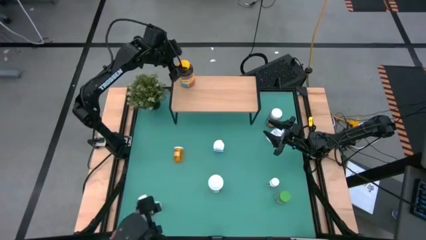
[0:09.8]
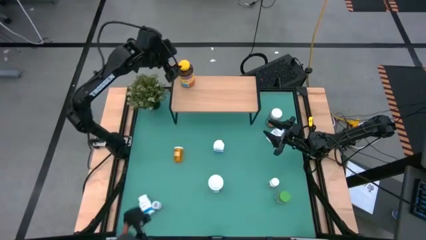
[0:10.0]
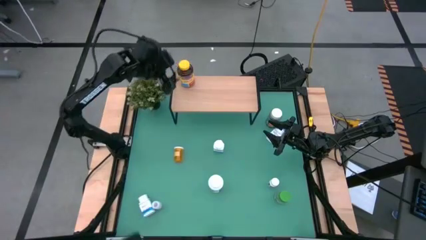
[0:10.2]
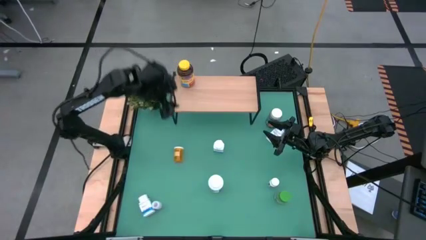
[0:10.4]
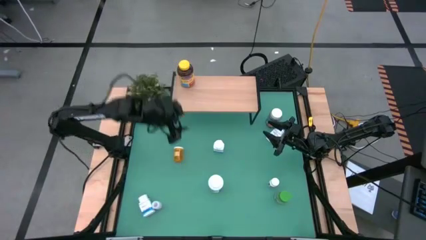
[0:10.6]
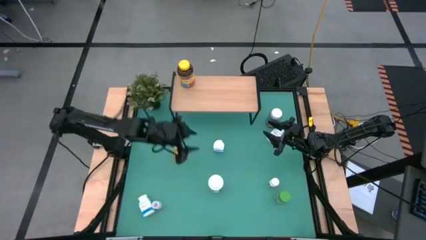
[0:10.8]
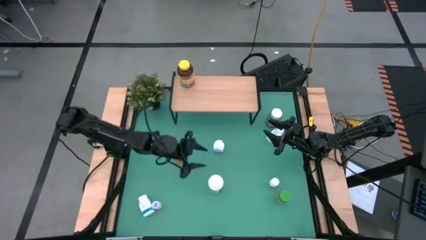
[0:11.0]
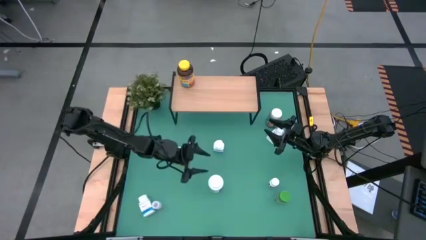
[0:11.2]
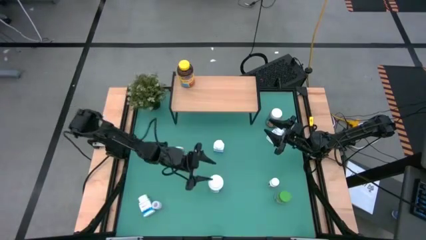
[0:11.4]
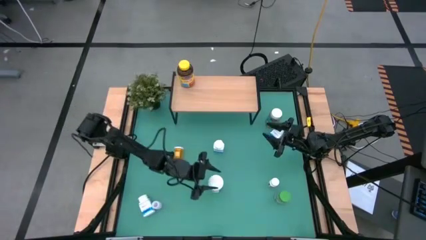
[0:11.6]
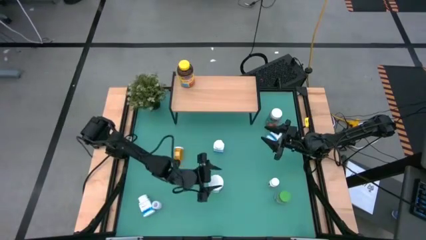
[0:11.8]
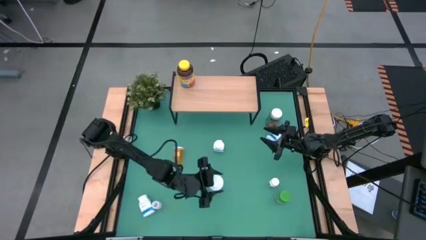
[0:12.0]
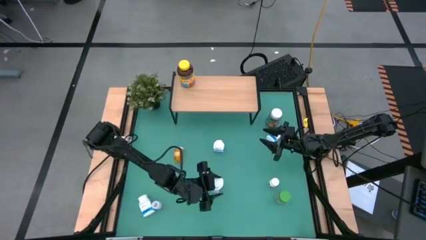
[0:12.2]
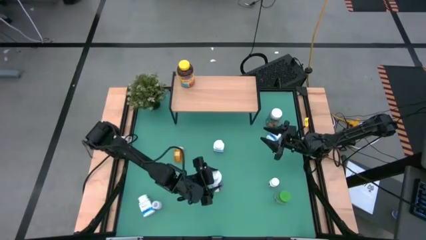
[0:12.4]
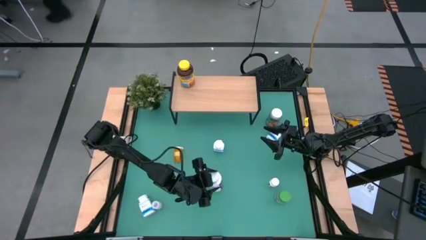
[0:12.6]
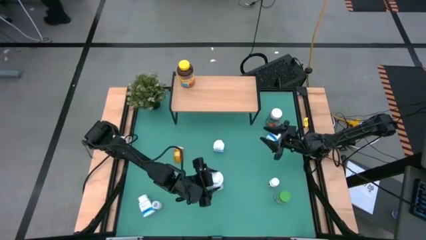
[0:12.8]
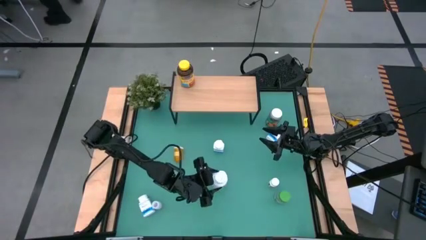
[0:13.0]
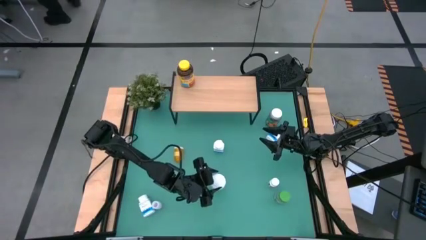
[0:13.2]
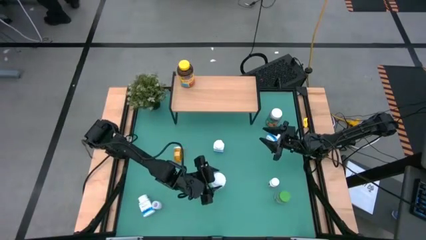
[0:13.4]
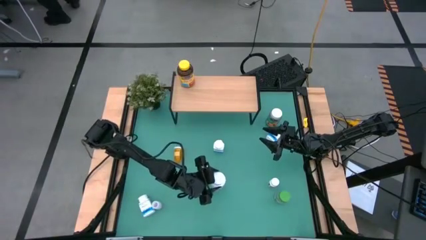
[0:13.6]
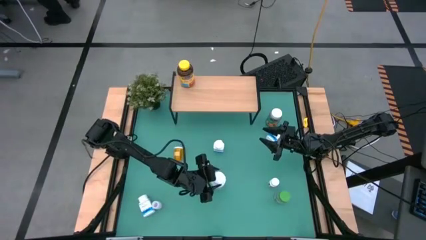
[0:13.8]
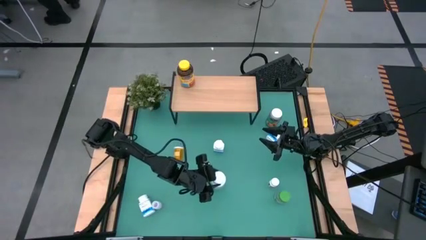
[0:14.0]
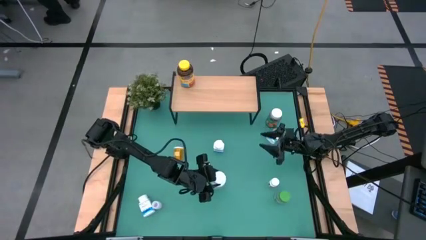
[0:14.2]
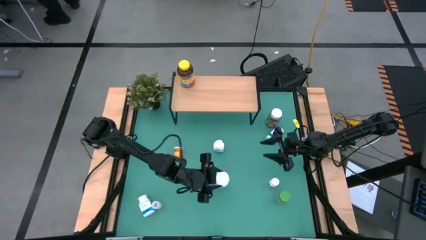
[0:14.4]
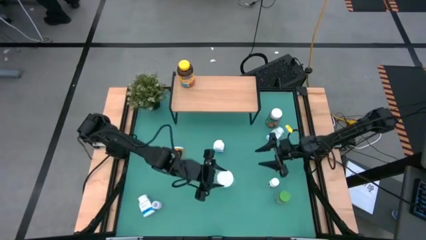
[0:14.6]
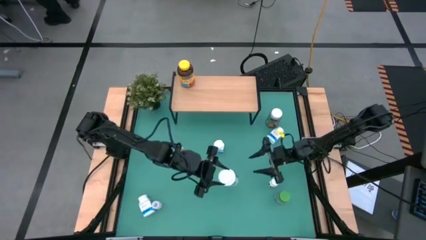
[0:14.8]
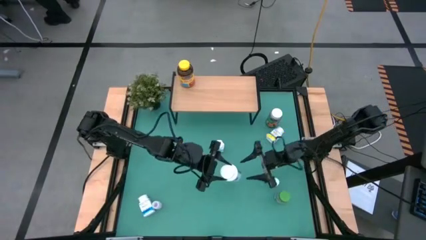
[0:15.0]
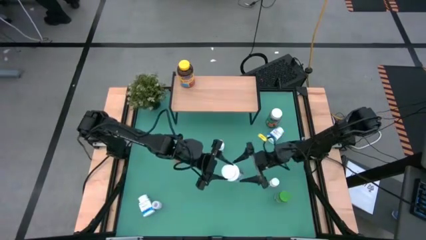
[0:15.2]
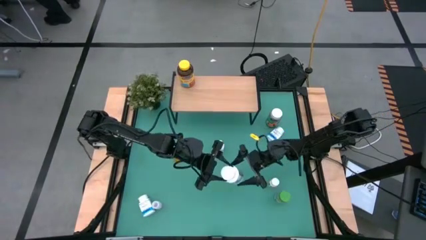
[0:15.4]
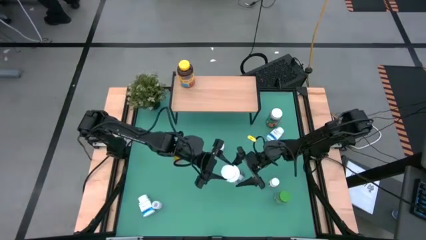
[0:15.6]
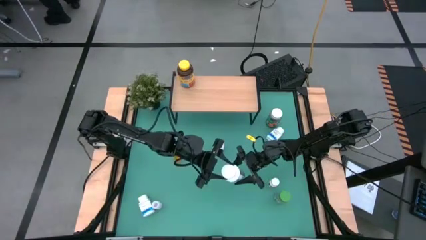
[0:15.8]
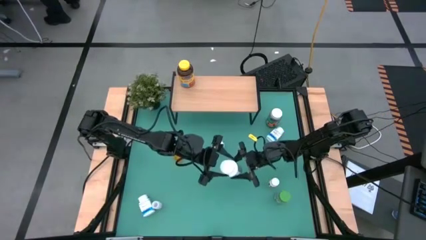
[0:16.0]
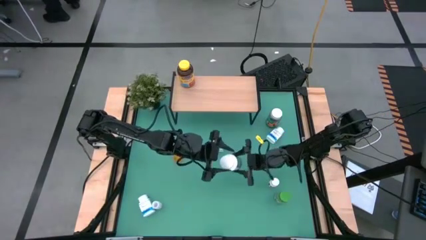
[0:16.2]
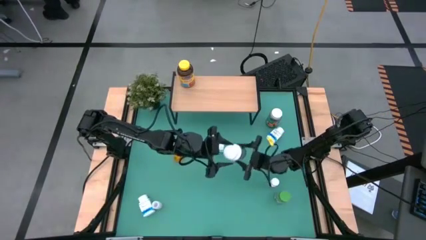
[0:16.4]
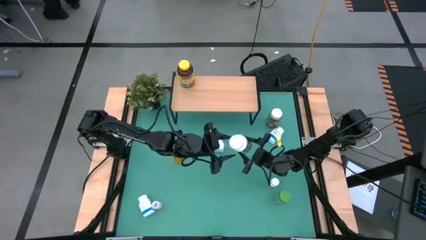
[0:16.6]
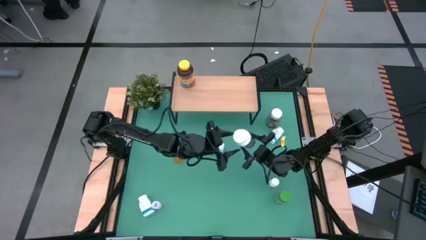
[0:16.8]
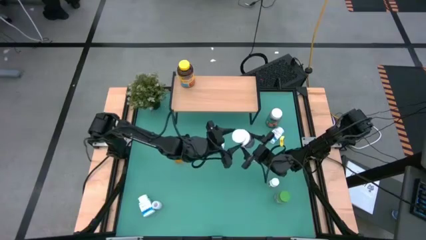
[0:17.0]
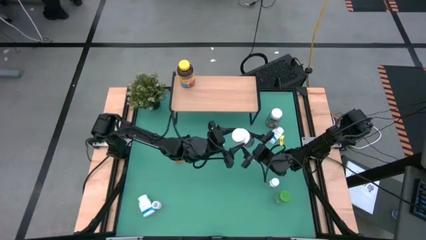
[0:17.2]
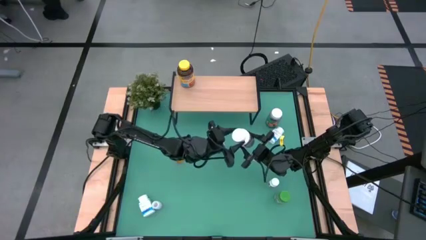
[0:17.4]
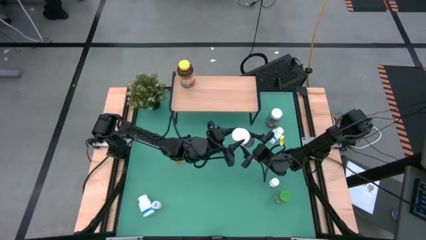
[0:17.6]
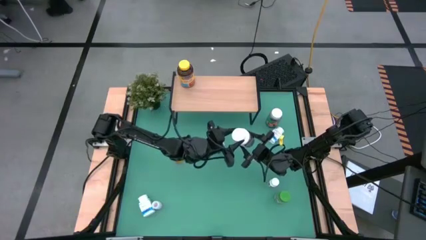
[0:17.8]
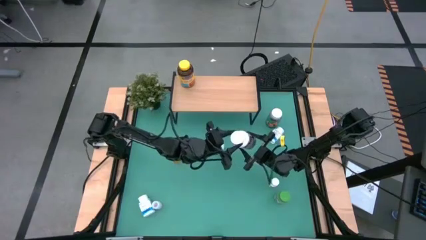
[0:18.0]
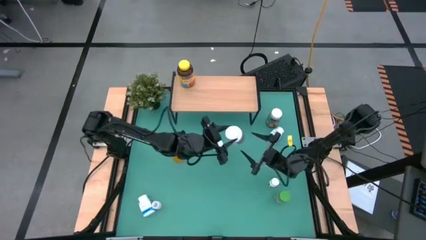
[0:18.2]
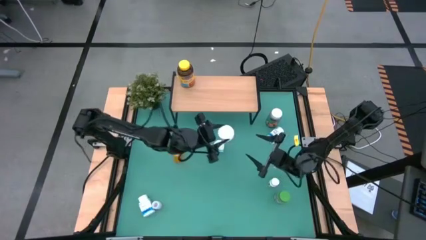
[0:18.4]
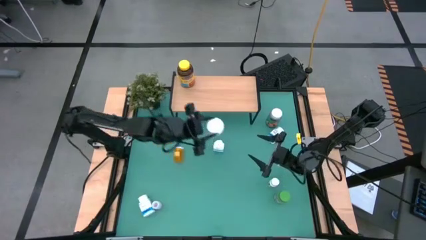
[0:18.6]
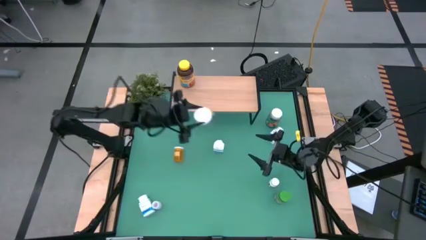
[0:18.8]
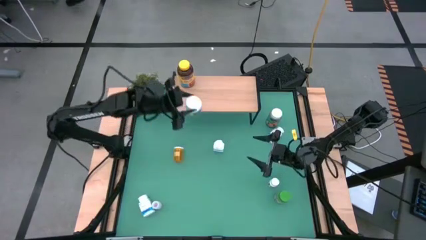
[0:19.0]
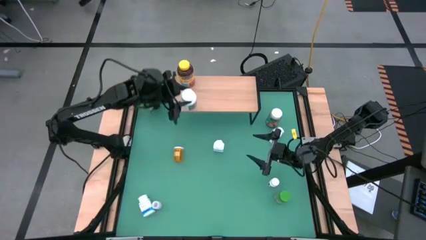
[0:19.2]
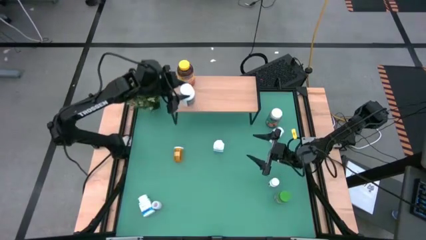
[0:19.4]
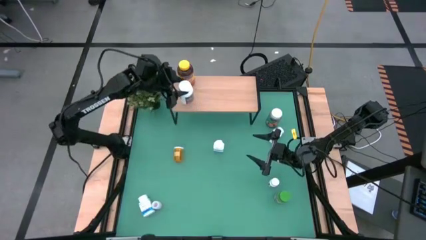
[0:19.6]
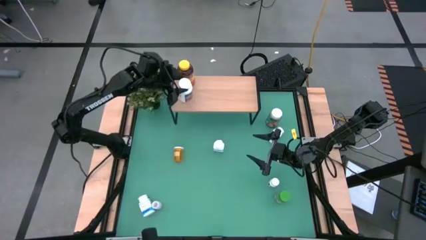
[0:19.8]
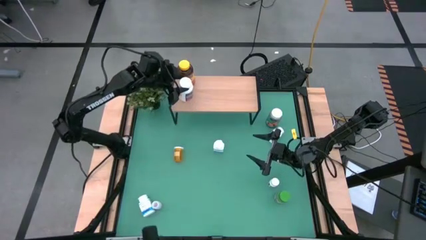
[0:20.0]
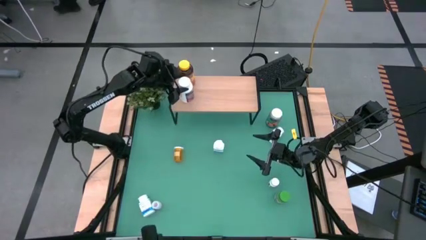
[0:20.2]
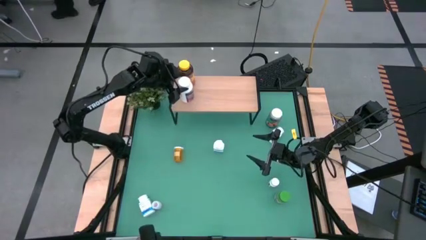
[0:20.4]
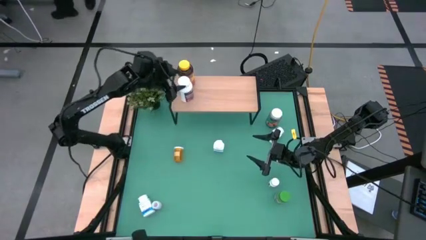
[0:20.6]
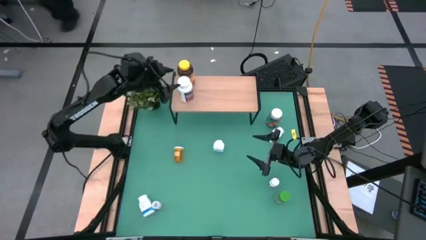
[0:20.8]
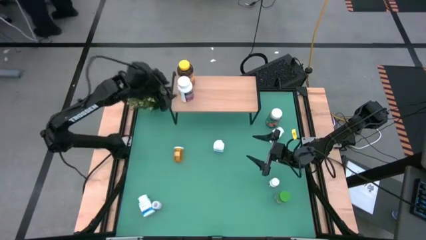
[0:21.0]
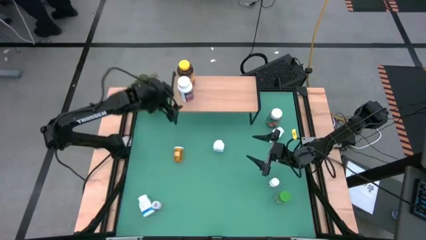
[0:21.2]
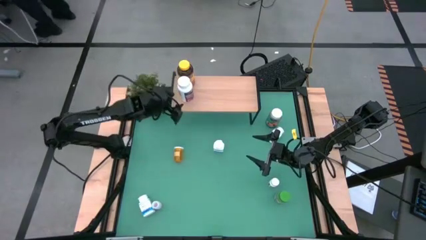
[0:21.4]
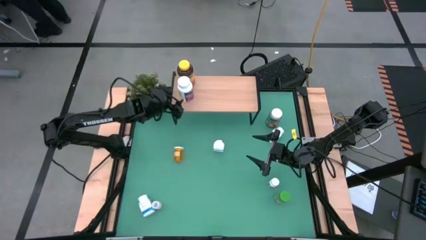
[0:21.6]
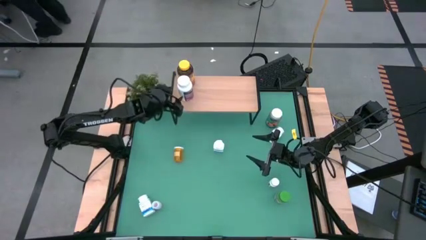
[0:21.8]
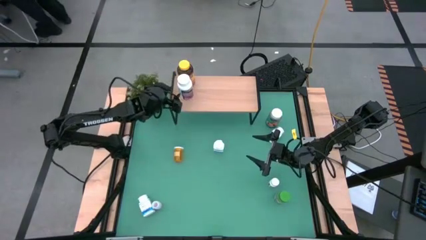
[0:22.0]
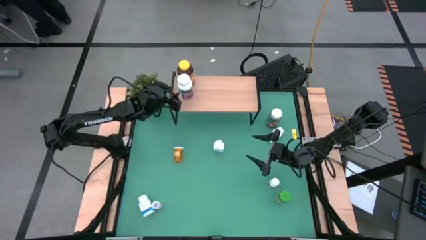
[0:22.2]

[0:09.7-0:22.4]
Task: Pick and place medicine bottles onto shelf by color
Put the white and purple pill bottle on the shelf

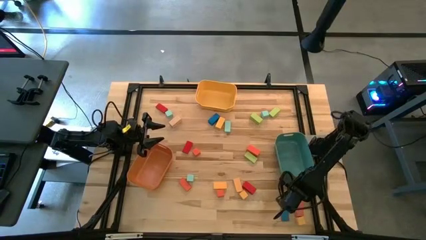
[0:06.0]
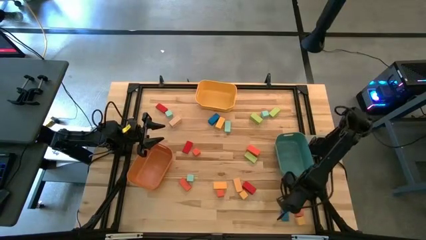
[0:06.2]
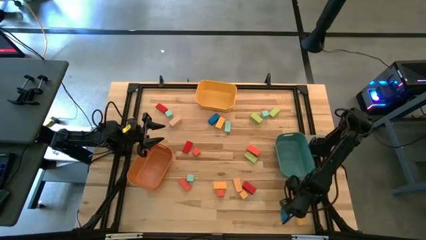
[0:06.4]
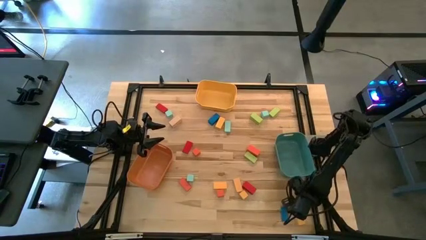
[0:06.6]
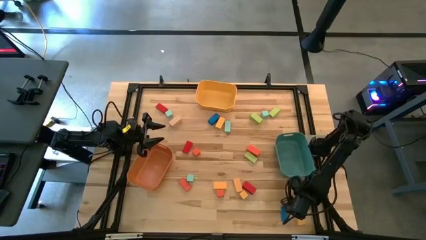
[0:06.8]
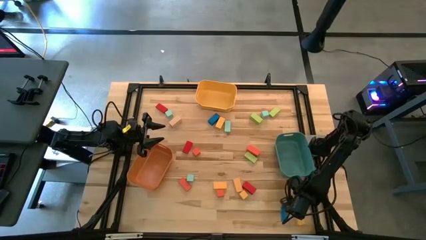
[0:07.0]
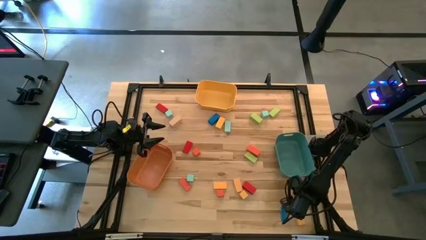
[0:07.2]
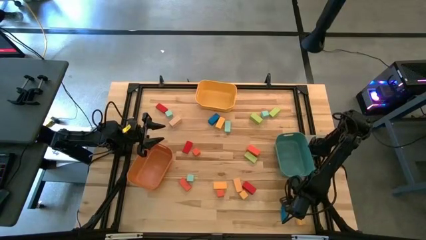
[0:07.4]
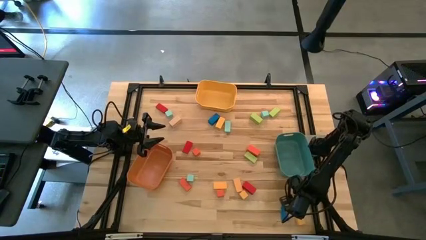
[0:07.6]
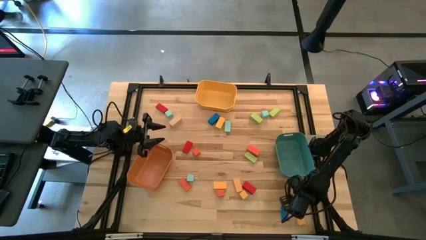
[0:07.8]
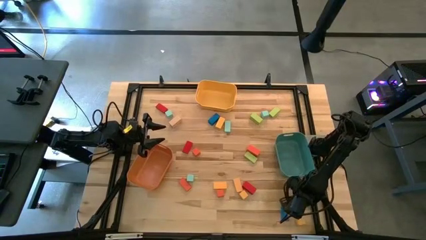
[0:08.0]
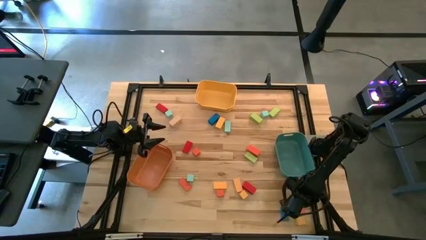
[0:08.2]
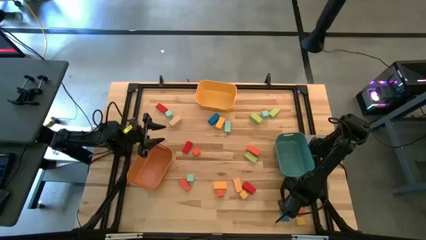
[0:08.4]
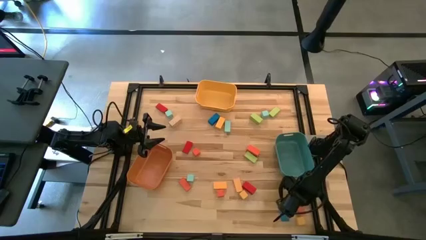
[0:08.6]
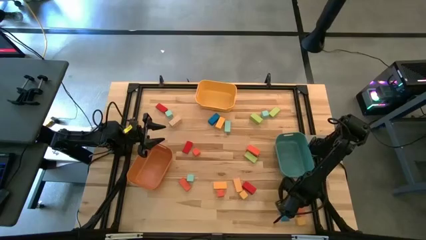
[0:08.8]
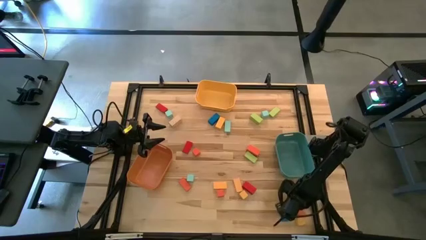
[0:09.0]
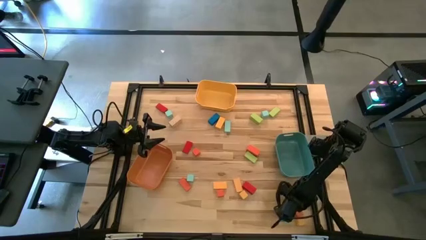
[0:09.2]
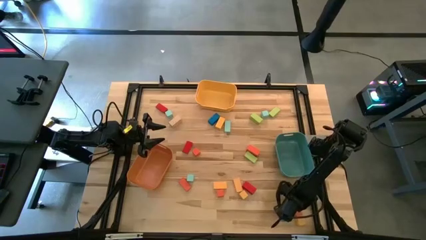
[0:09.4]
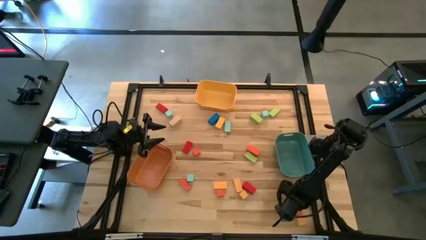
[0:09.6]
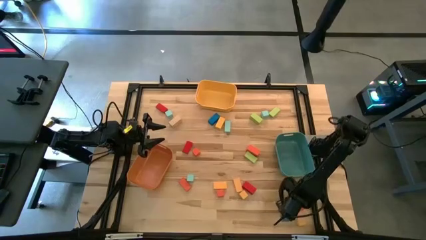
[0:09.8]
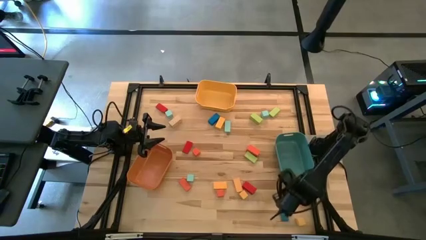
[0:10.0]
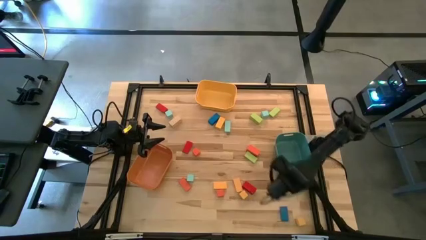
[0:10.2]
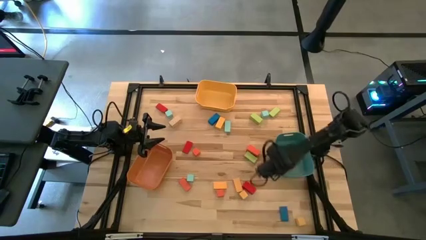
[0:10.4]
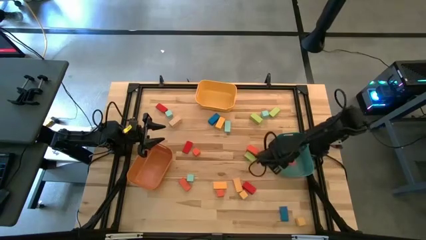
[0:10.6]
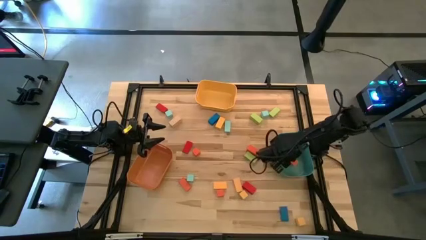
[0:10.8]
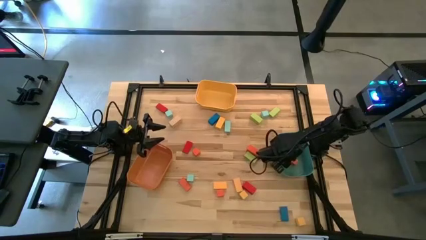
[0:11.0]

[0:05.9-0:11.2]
Task: Sort blocks by size
Put the thick orange rectangular block into the green bin
